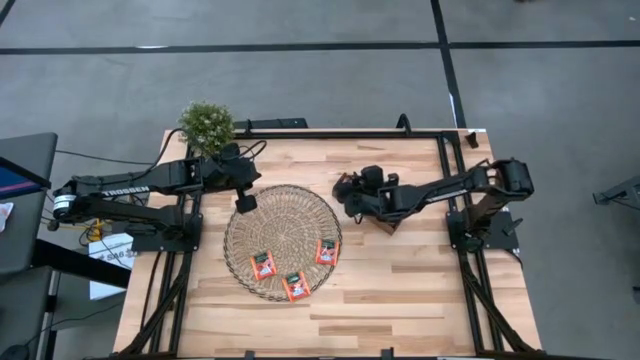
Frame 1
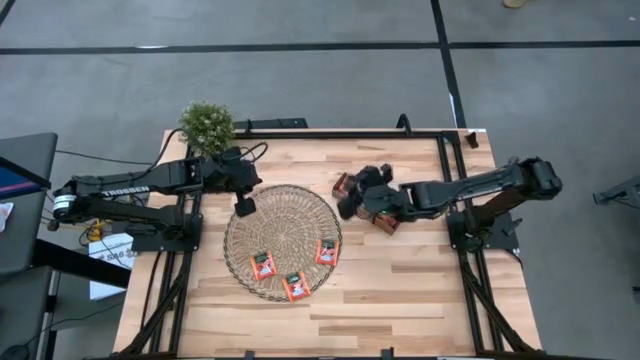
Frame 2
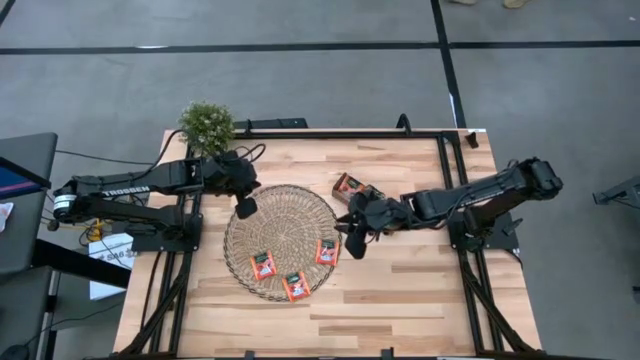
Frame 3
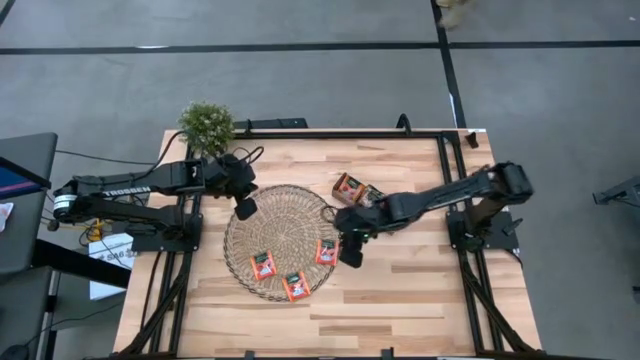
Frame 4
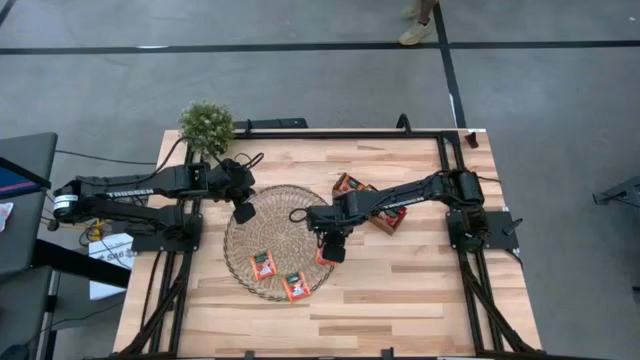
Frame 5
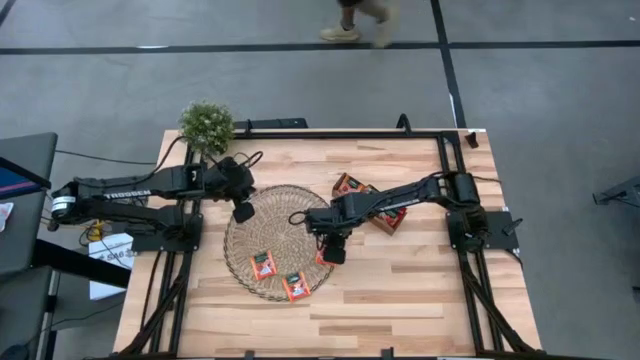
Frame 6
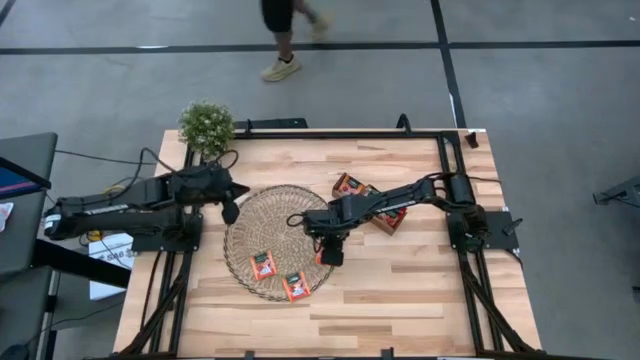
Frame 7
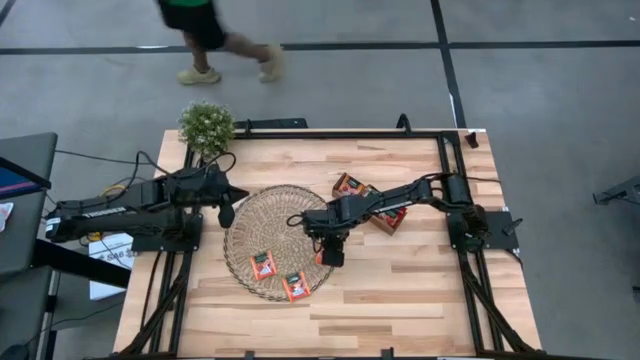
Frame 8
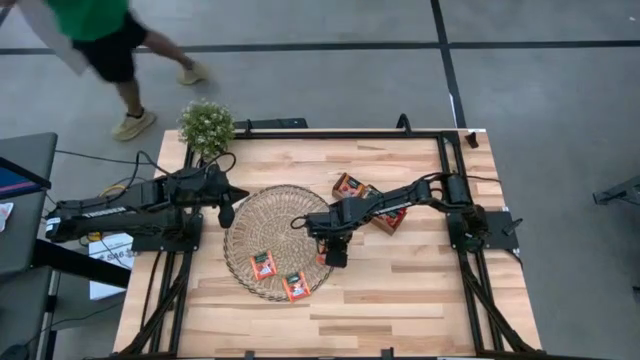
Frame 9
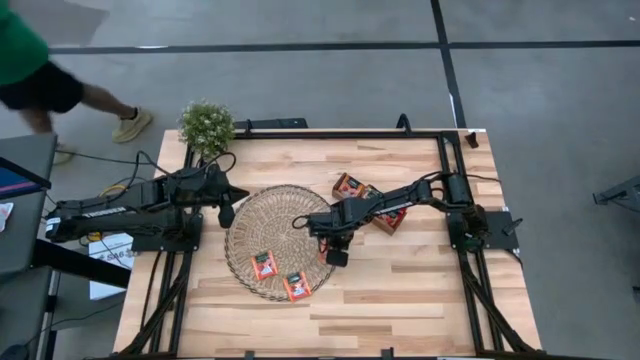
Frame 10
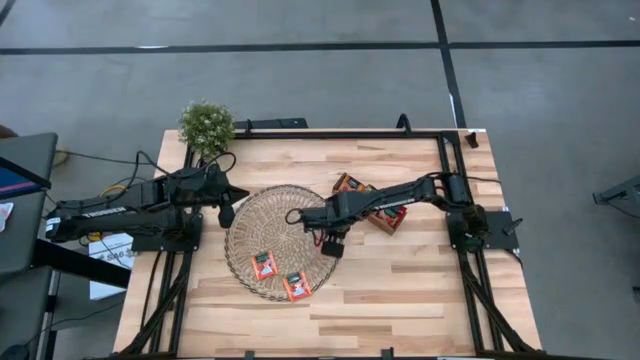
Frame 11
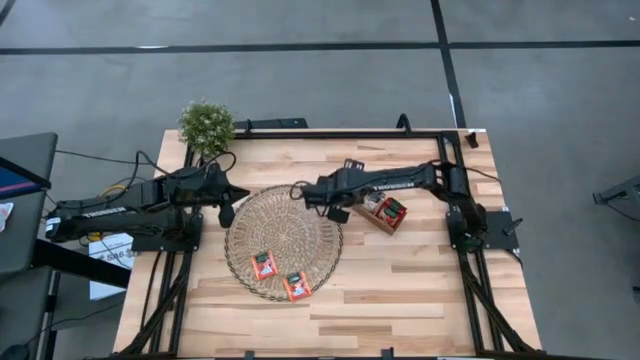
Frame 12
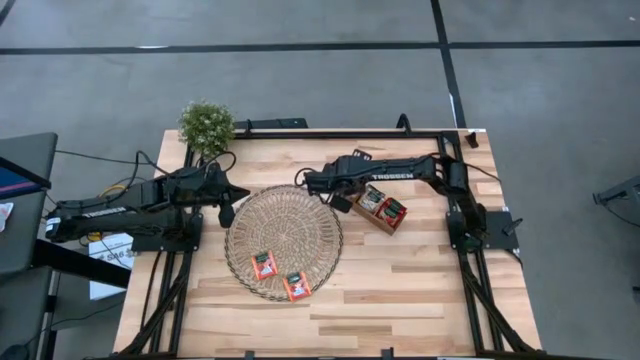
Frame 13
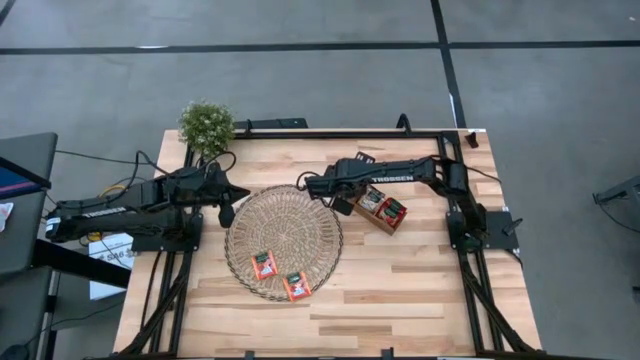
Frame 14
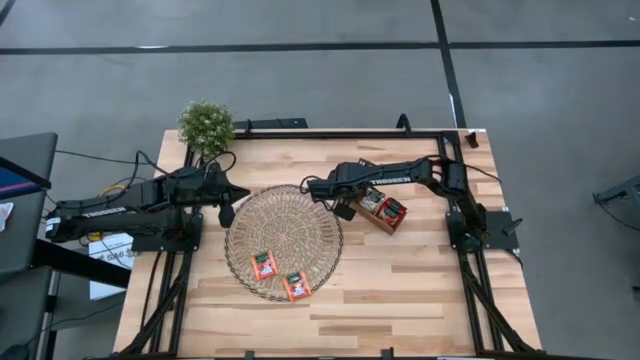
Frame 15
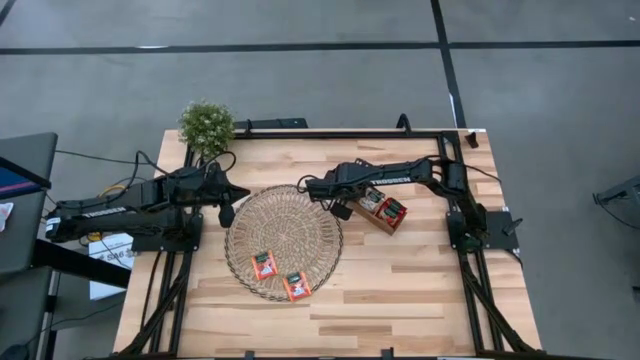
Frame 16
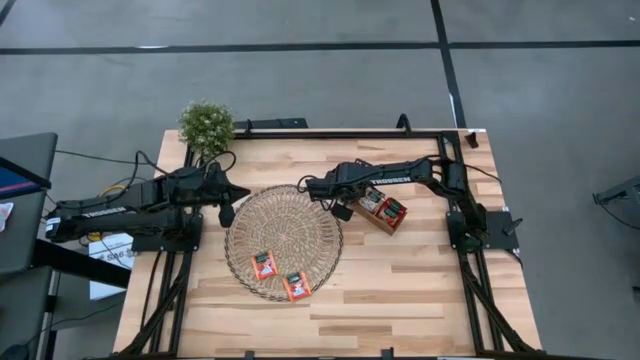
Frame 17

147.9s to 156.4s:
Task: Pick & Place Tea
Put the orange tea bag into the left section of the wooden organizer

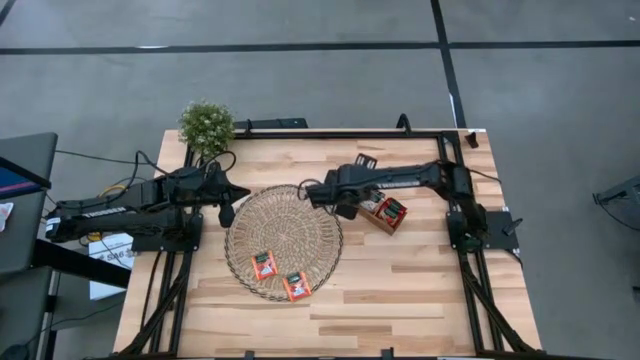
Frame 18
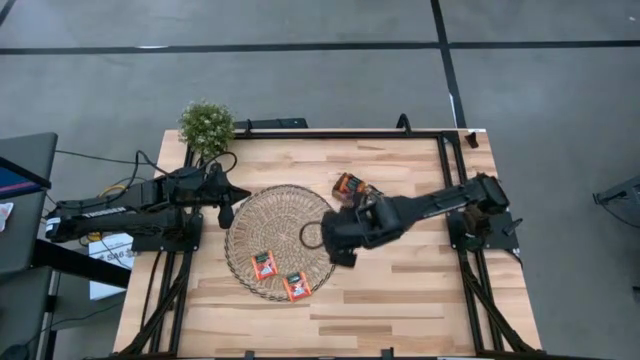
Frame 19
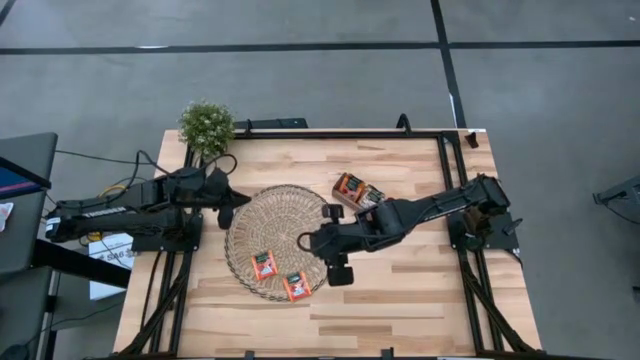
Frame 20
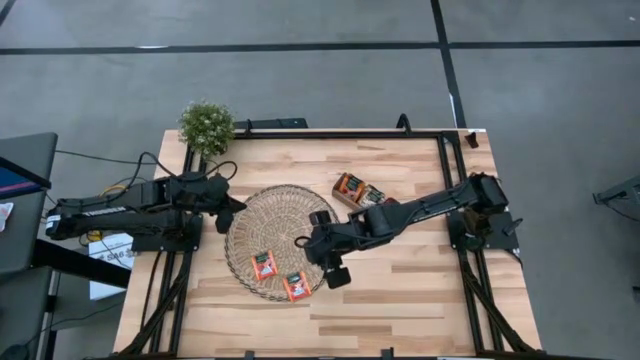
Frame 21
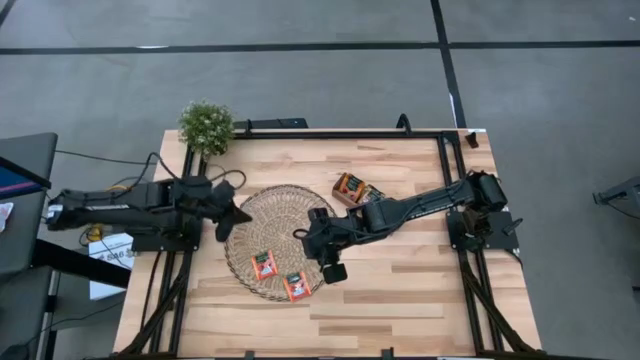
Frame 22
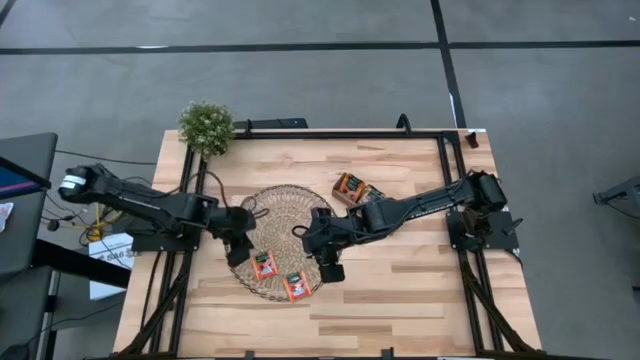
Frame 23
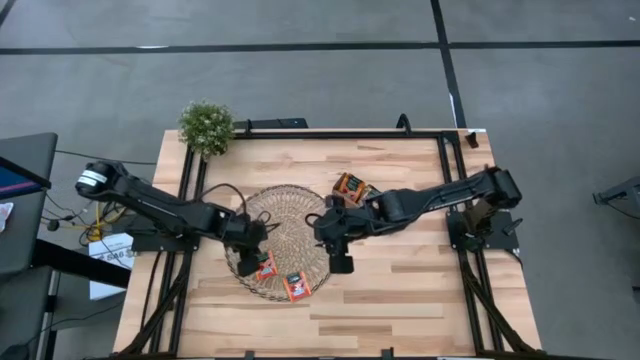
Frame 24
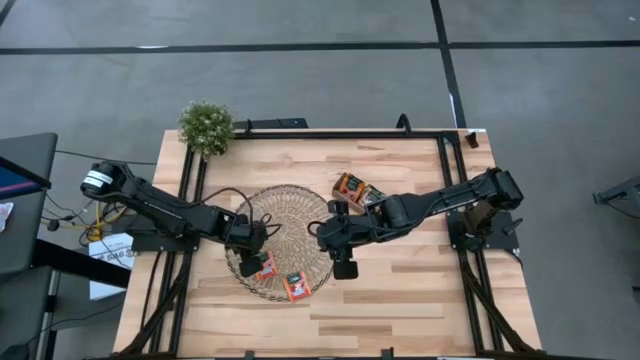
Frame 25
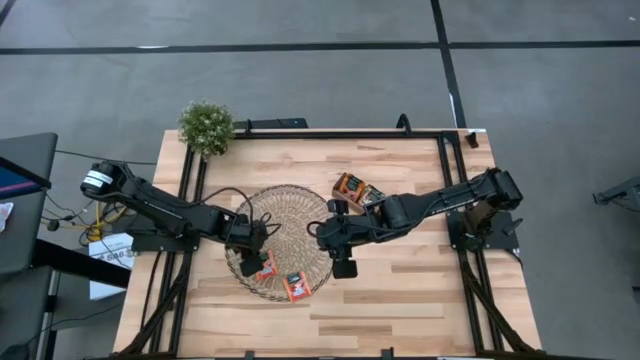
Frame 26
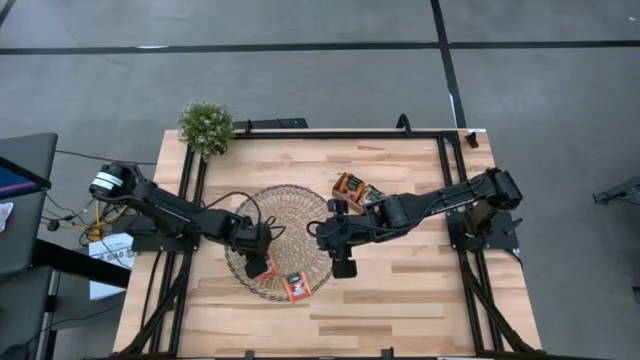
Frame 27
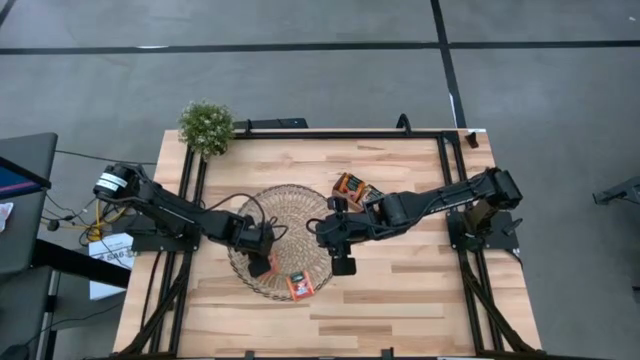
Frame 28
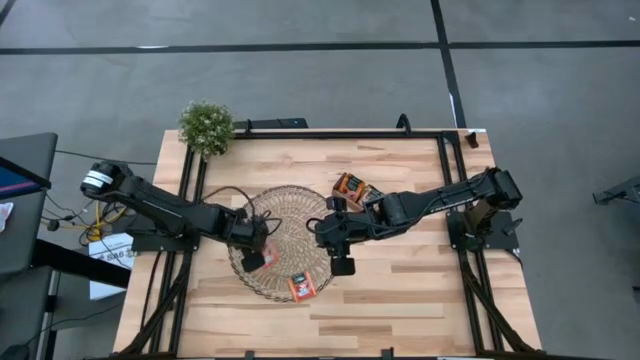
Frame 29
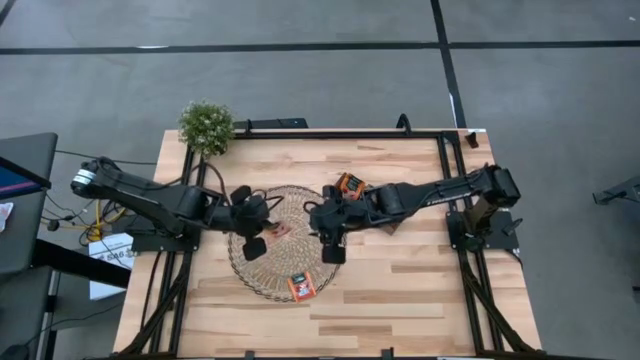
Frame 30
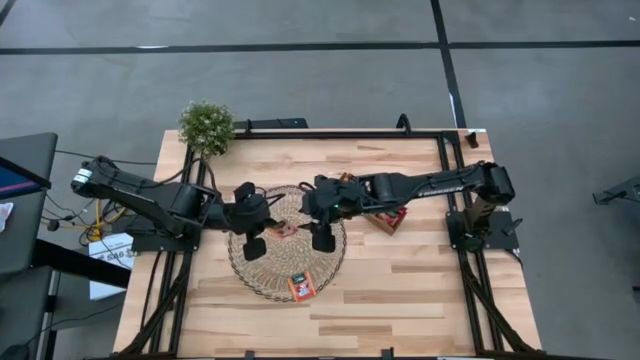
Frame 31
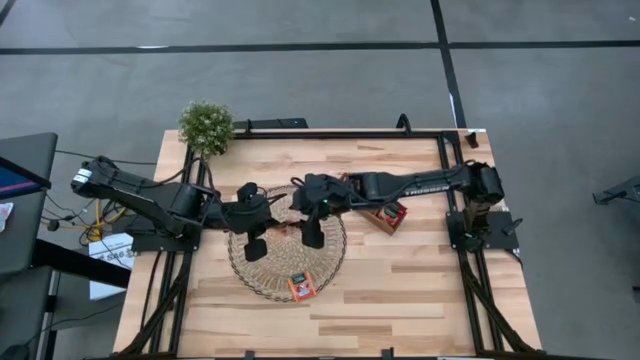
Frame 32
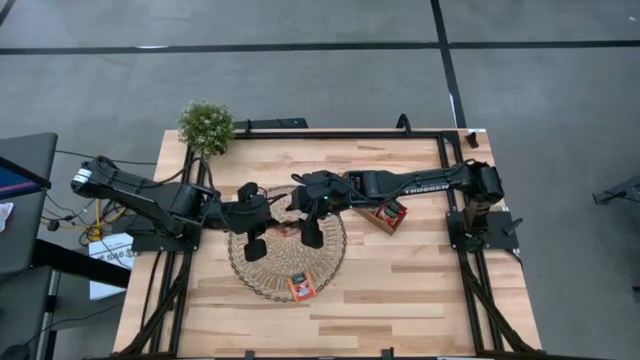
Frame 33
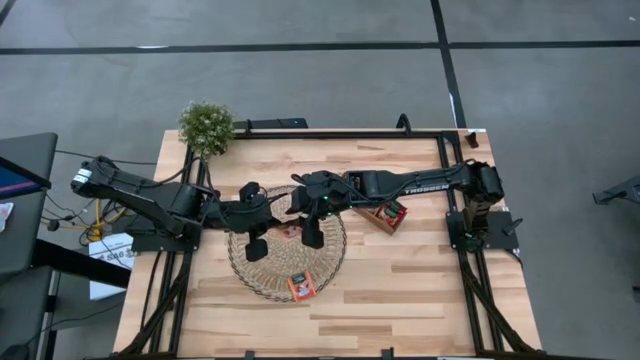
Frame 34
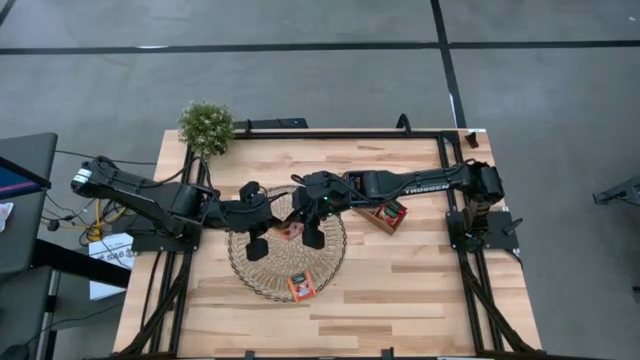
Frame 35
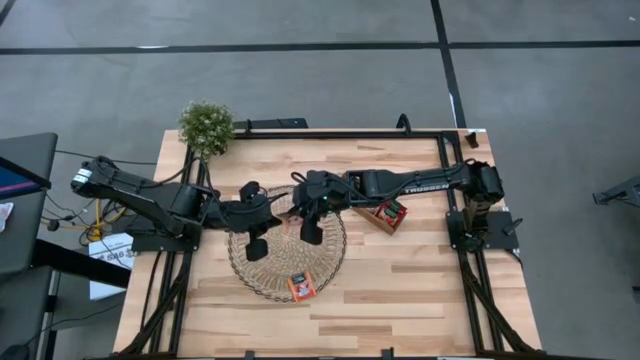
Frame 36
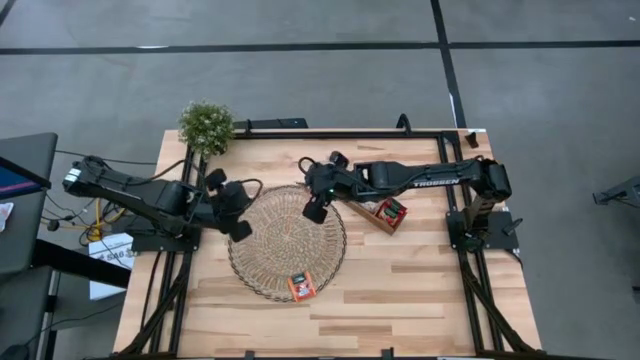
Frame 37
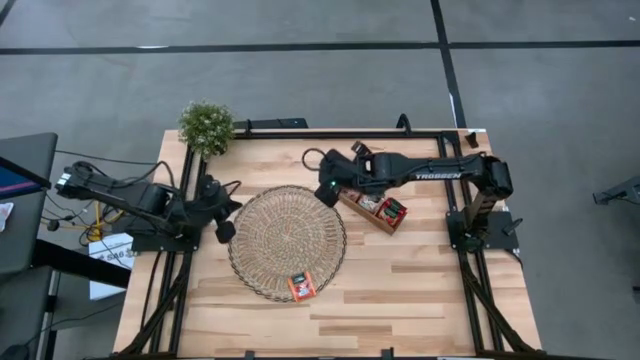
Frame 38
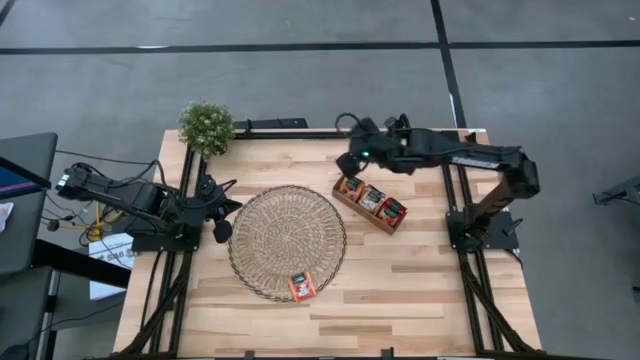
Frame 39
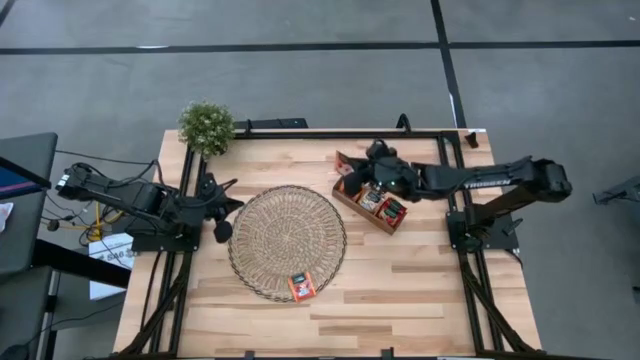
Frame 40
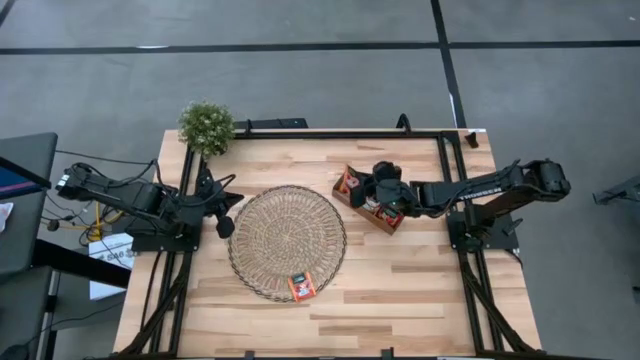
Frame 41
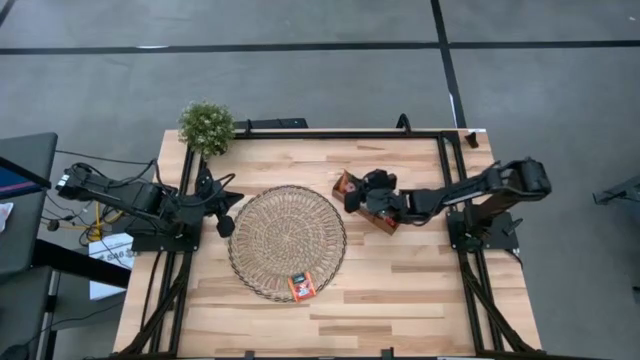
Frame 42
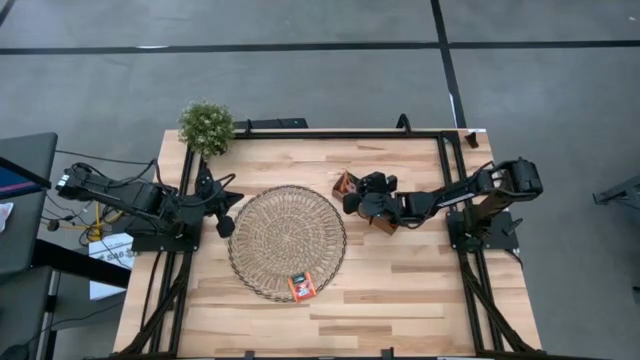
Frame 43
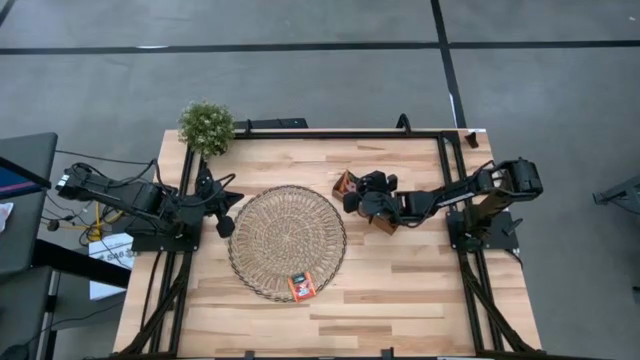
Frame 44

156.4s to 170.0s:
Put the orange tea bag into the left section of the wooden organizer
